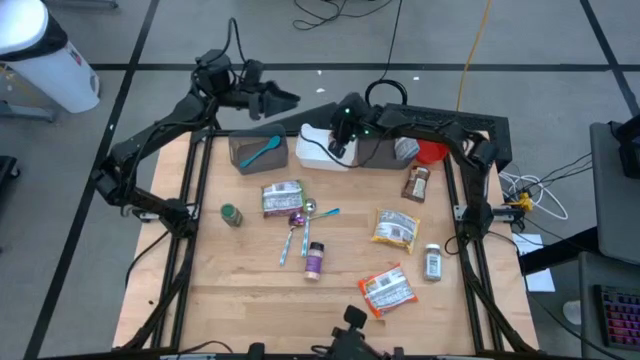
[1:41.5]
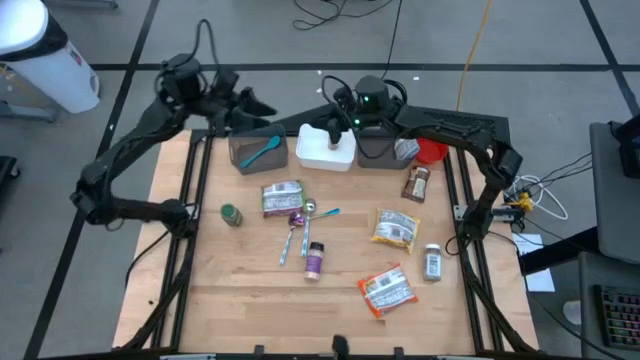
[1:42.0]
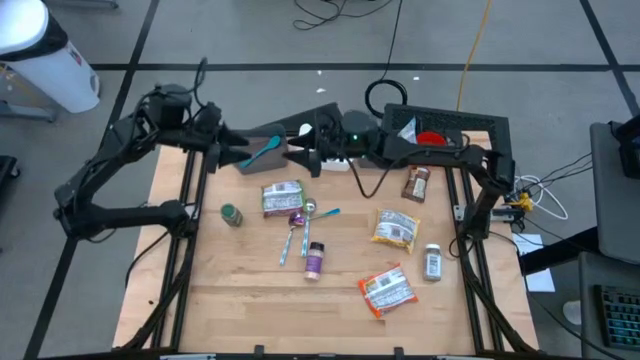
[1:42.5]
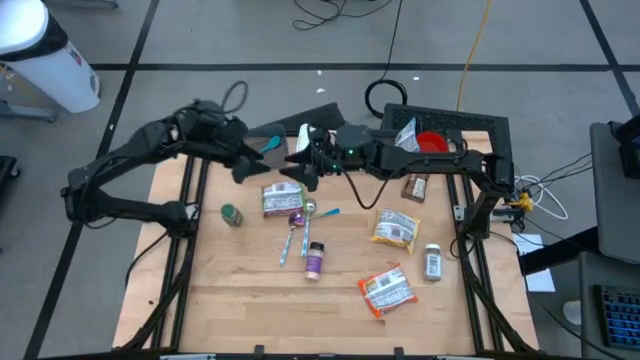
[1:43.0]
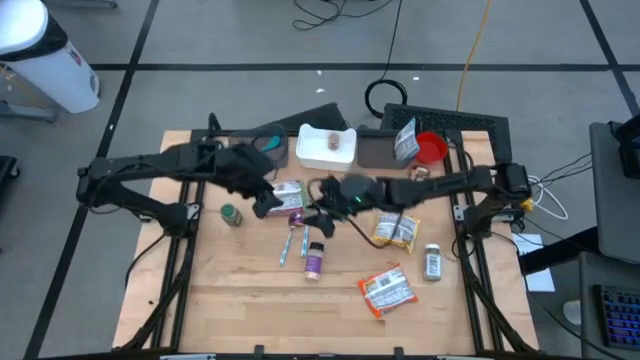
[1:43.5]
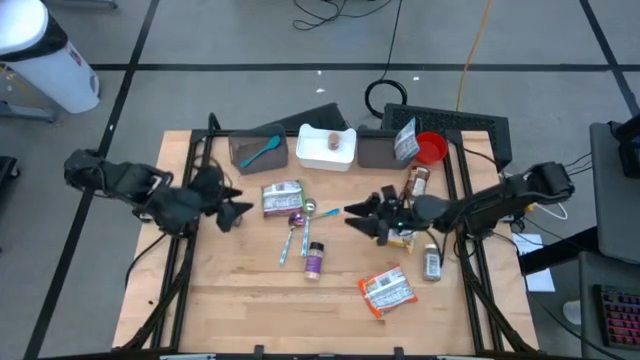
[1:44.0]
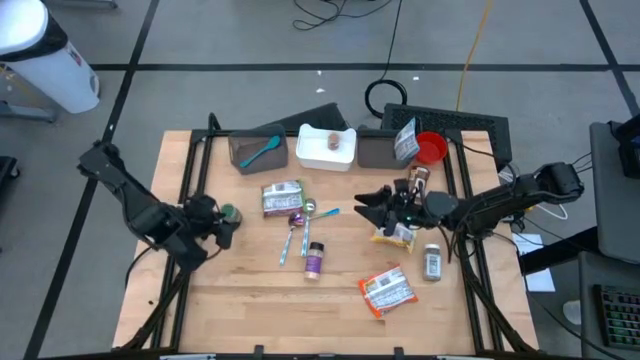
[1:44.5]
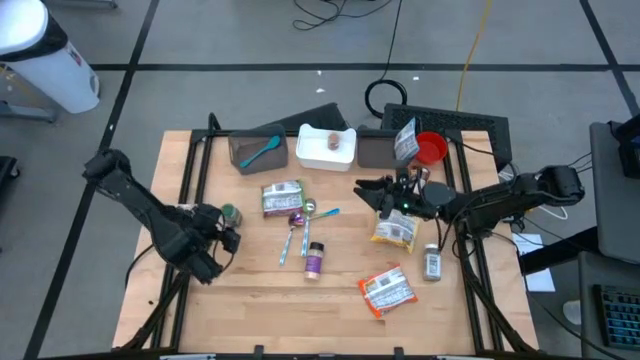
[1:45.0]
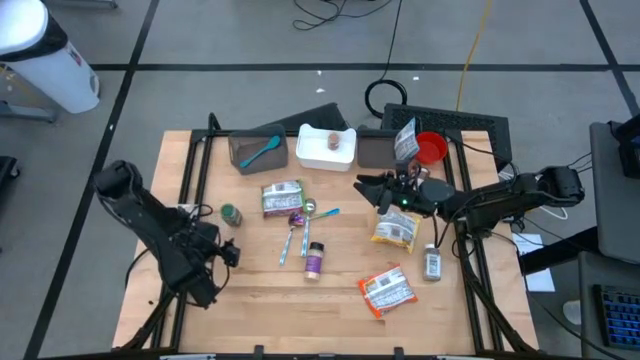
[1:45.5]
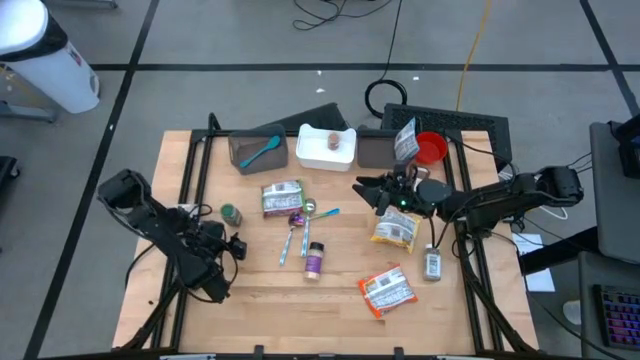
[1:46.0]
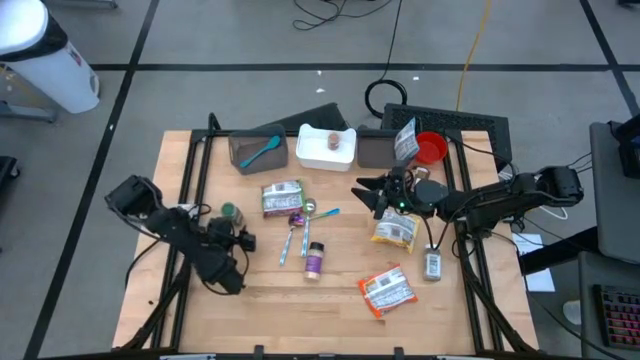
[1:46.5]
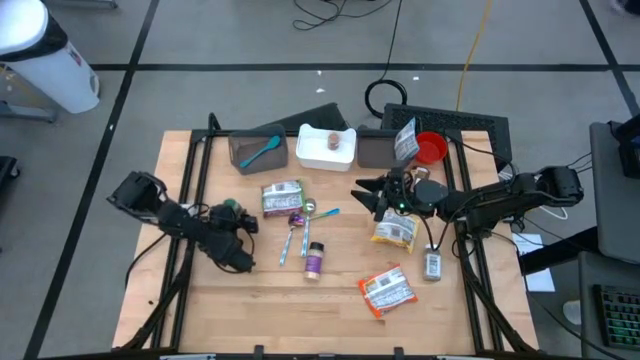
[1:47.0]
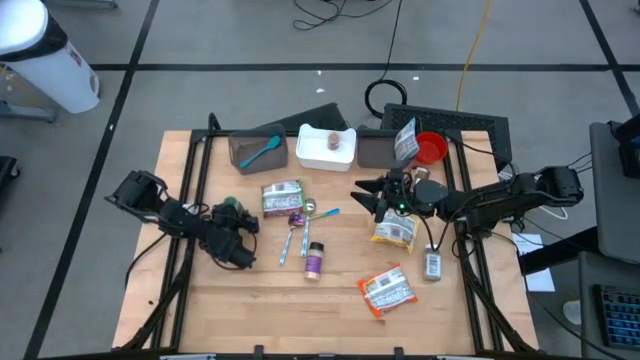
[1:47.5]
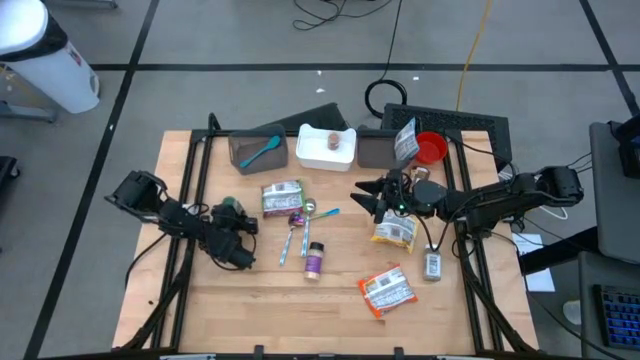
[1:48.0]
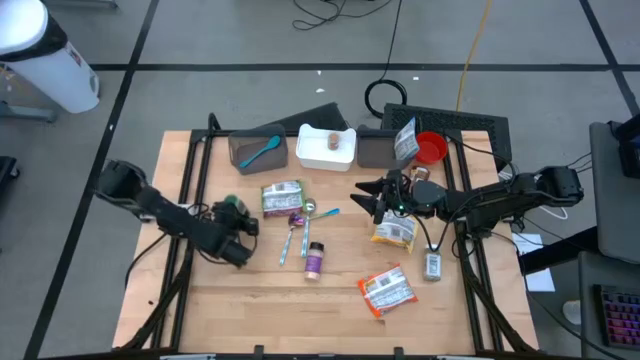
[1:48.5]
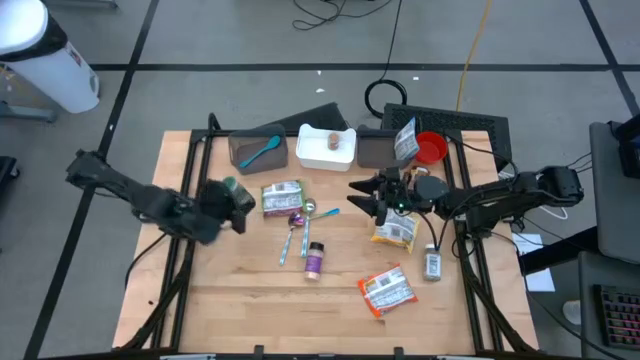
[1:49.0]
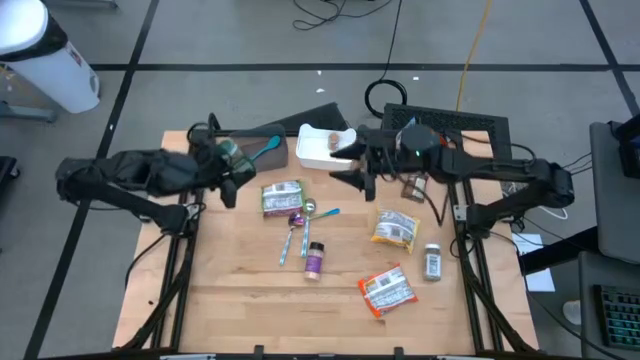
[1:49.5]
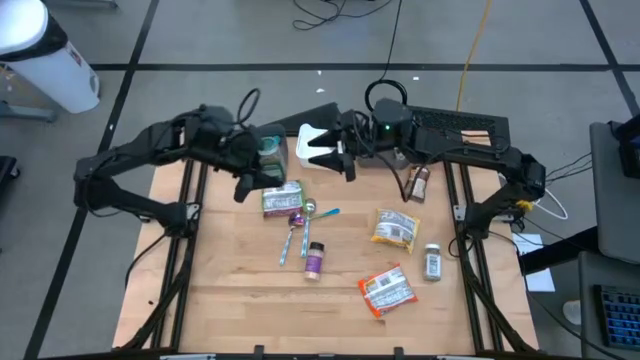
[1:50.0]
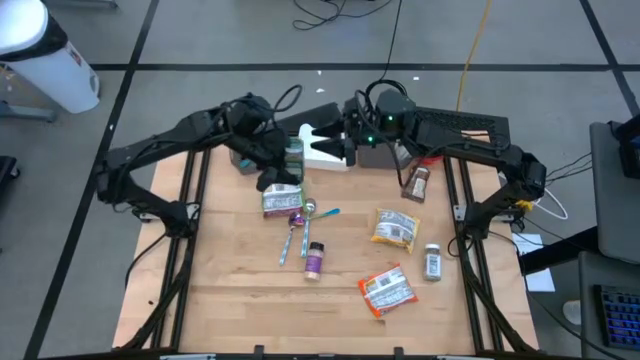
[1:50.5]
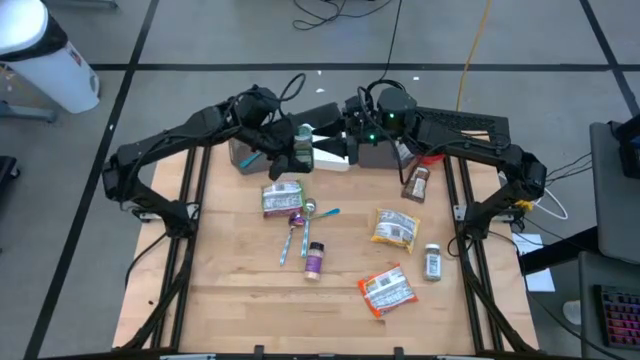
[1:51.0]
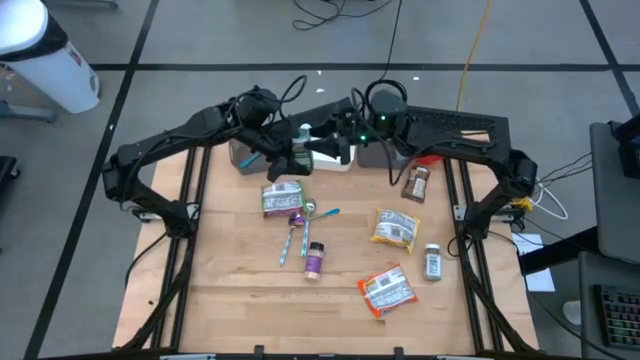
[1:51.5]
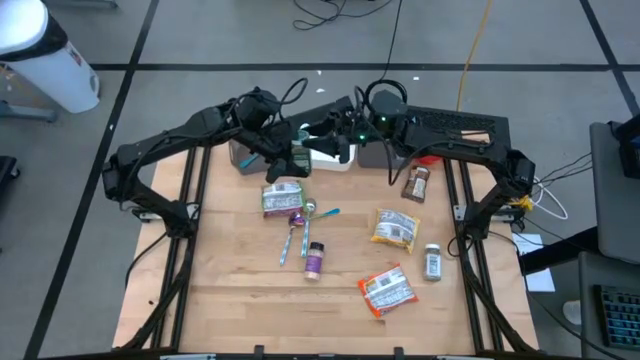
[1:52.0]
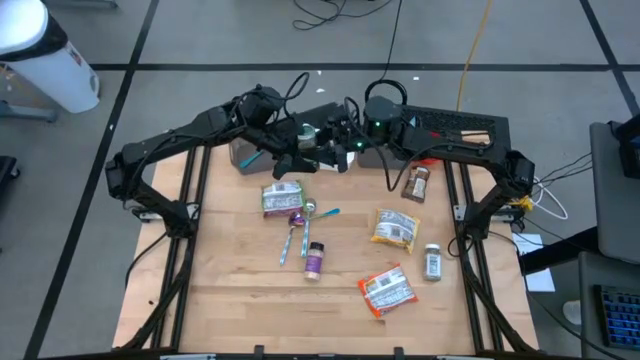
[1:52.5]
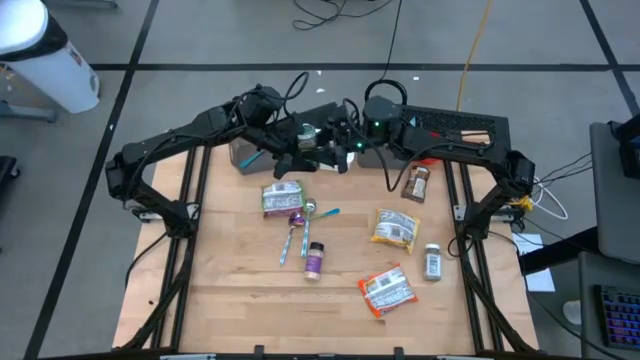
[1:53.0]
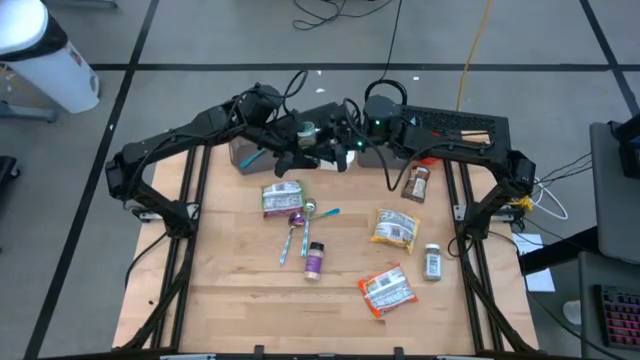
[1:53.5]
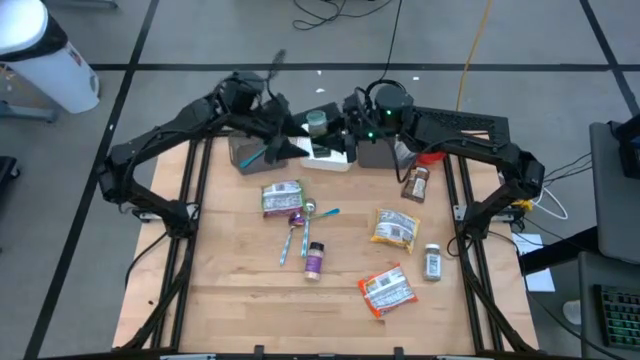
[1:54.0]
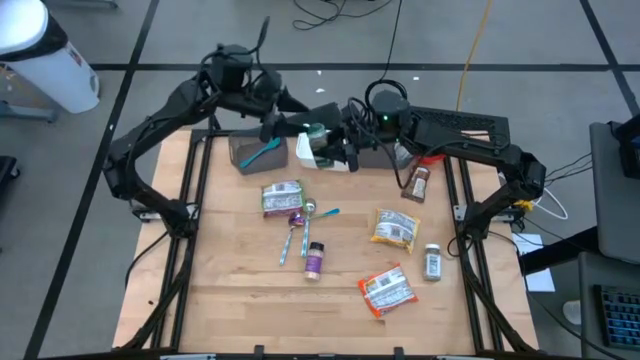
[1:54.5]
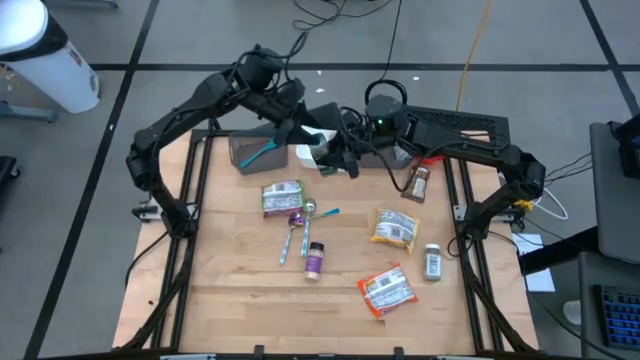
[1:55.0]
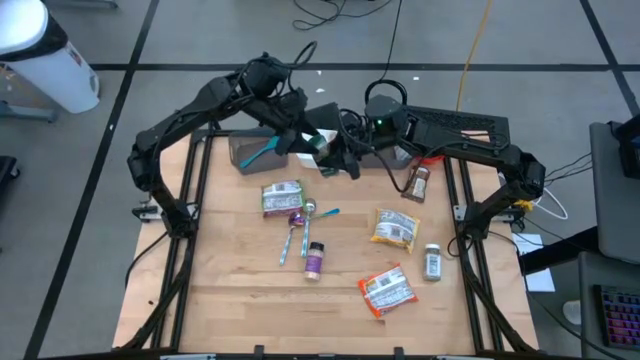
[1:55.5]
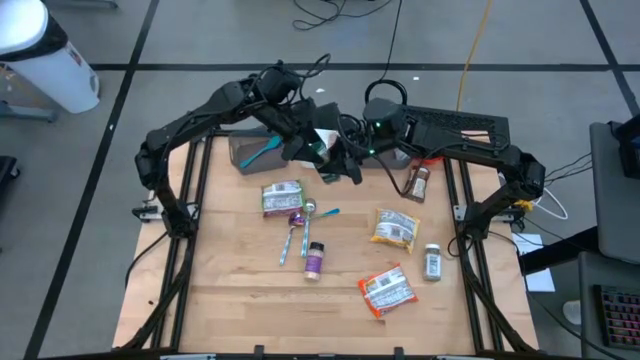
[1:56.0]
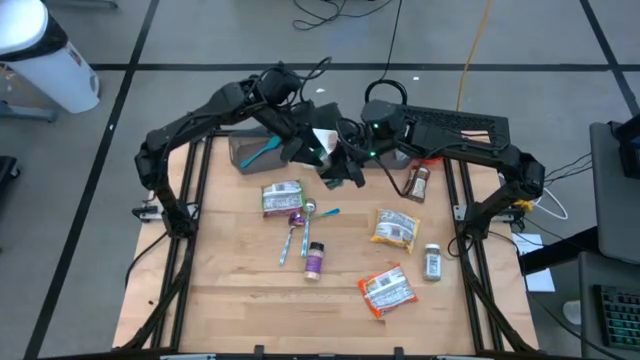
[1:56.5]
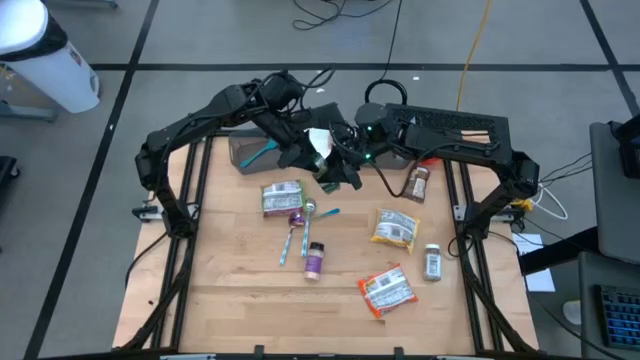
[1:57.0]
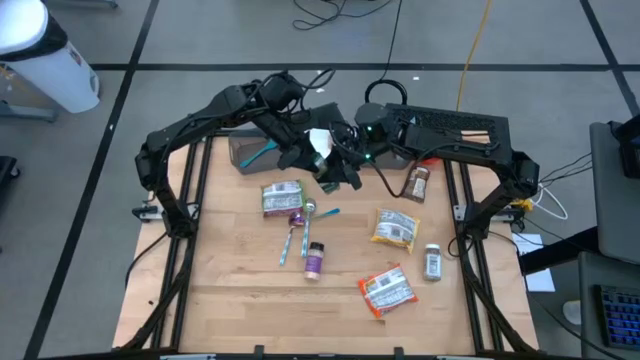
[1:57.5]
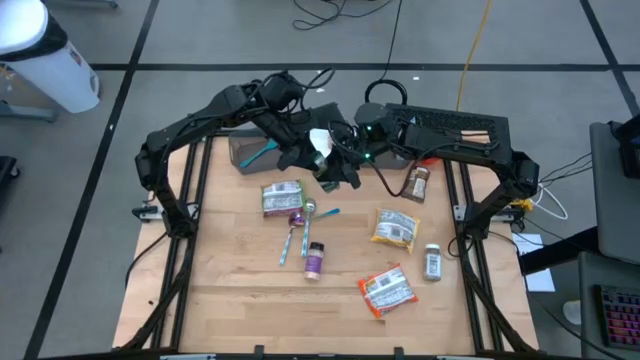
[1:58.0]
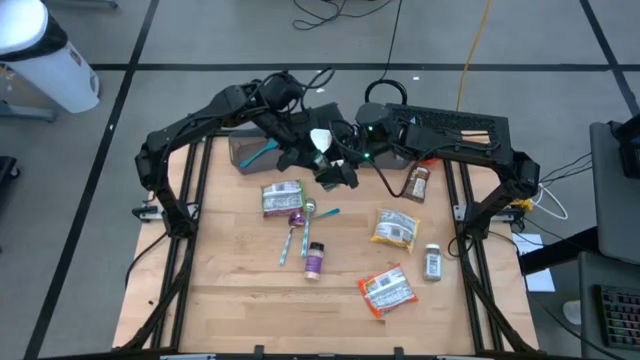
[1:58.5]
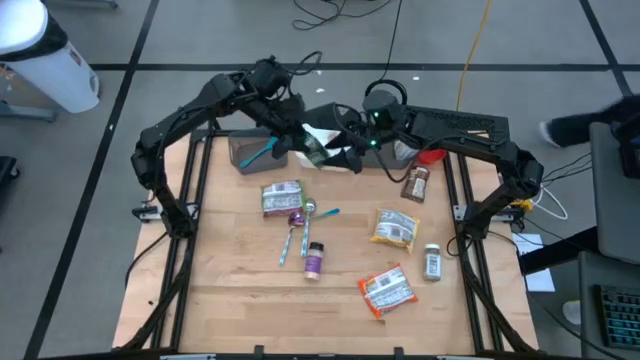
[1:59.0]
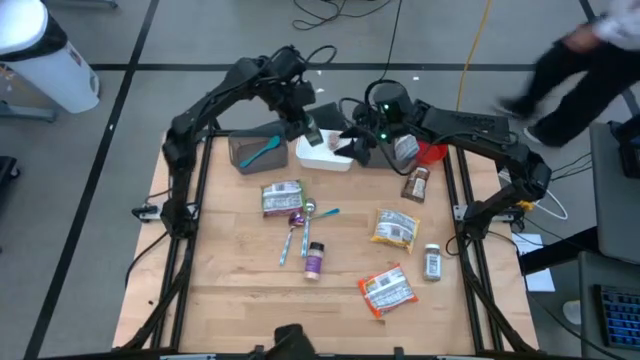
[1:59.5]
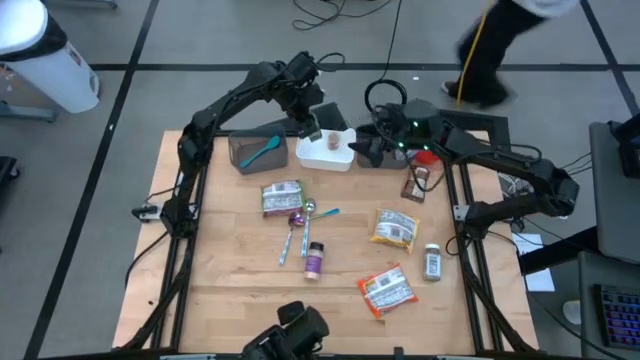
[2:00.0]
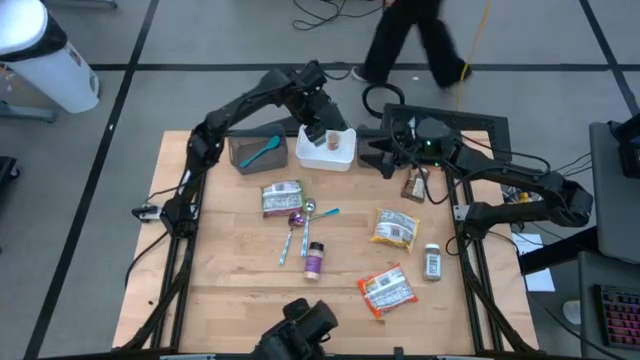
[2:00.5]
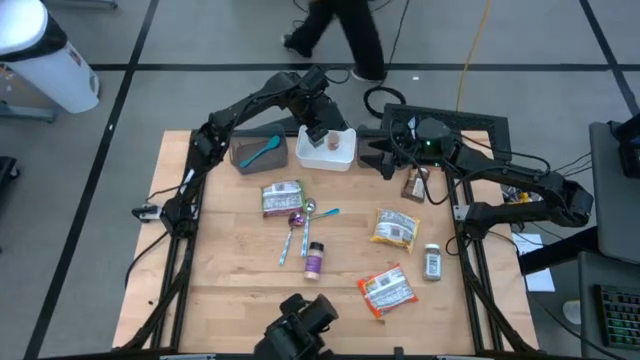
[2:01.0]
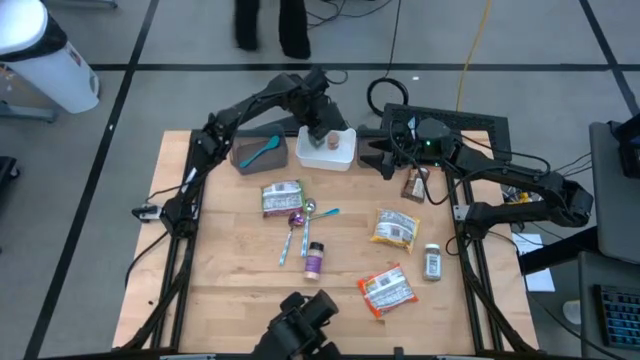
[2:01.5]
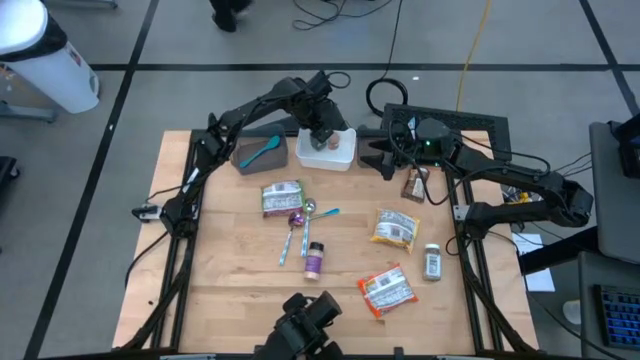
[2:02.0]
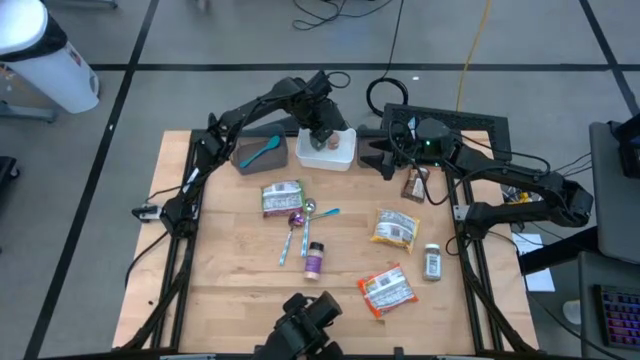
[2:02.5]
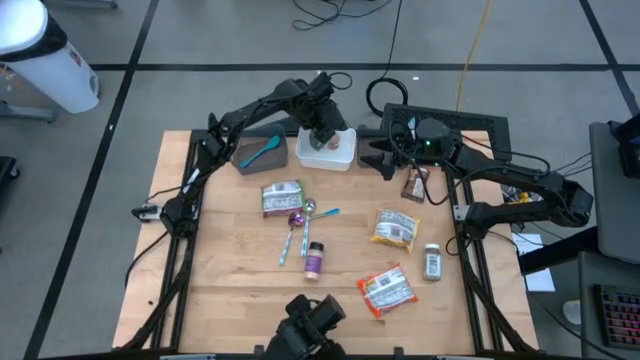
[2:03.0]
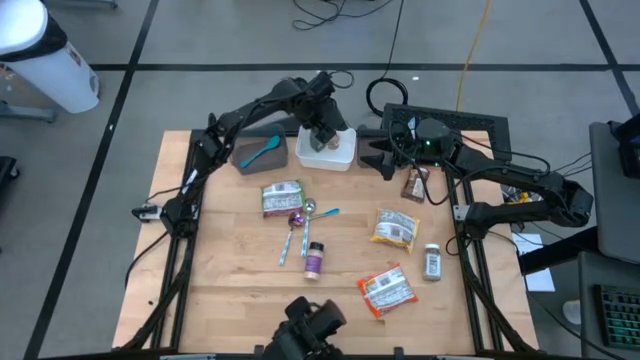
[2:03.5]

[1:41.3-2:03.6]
Task: Pick & Place Food Item
Put the green seasoning bottle into the white bin
